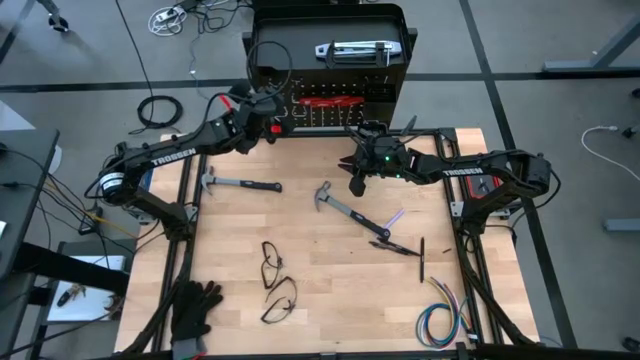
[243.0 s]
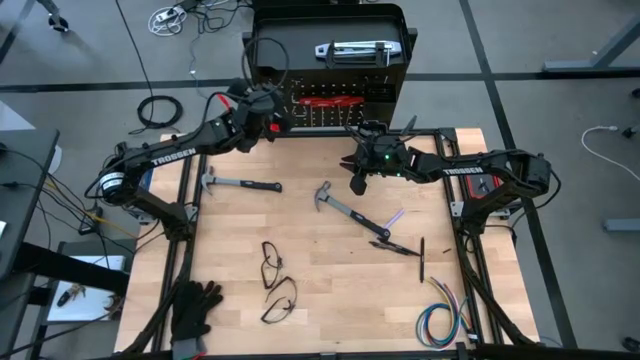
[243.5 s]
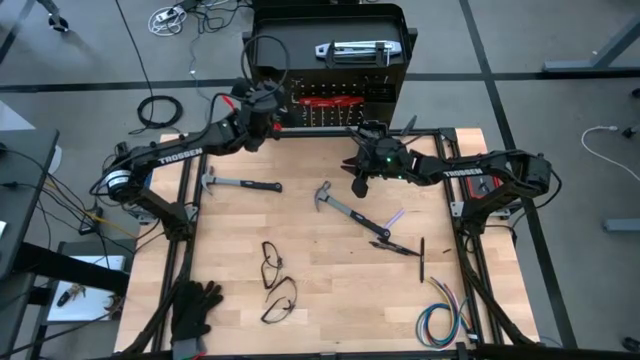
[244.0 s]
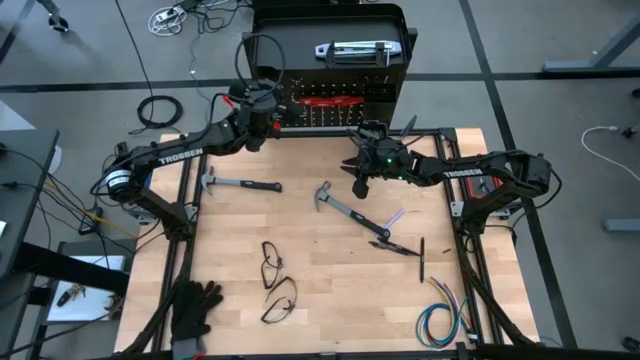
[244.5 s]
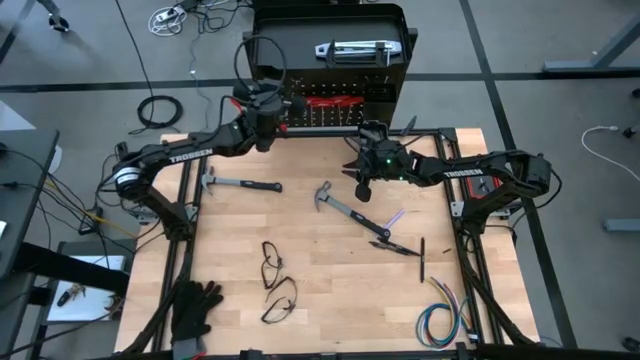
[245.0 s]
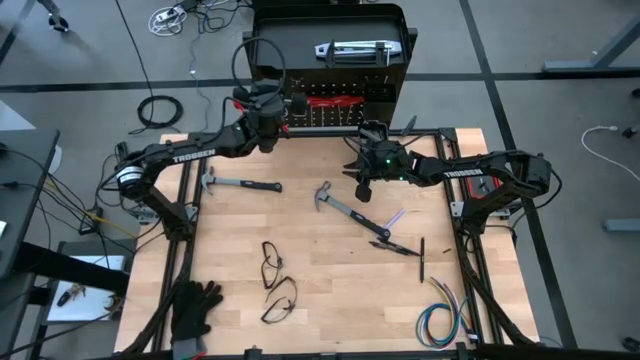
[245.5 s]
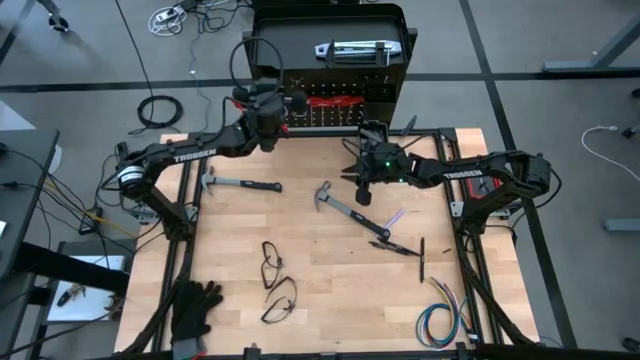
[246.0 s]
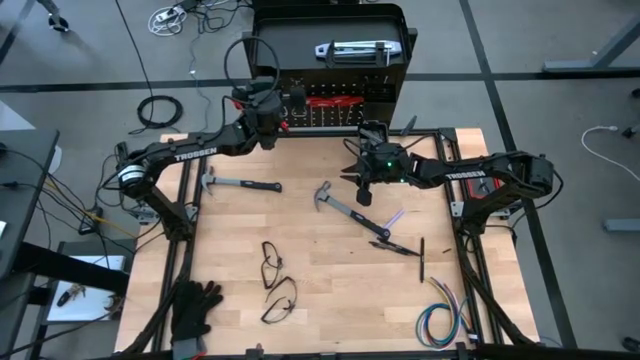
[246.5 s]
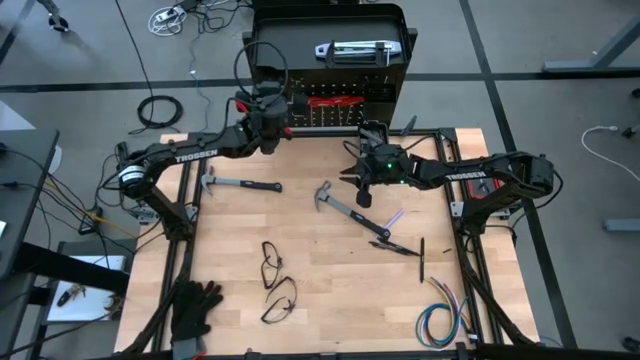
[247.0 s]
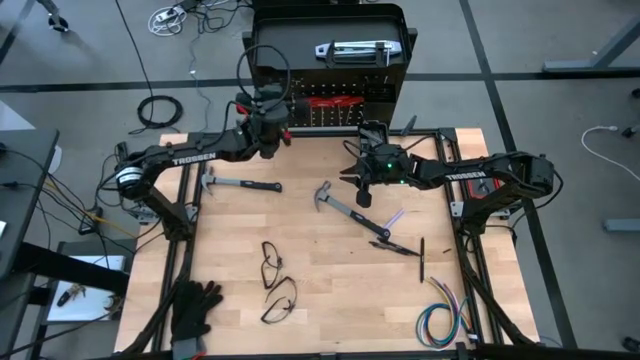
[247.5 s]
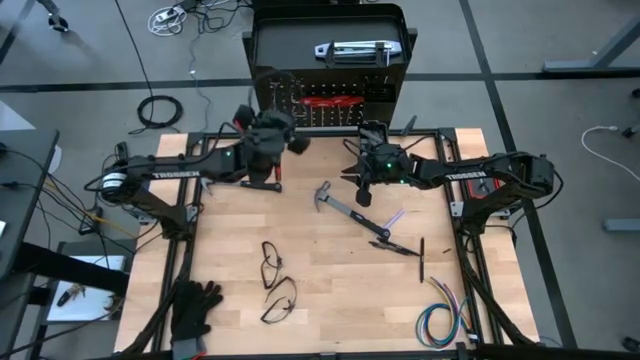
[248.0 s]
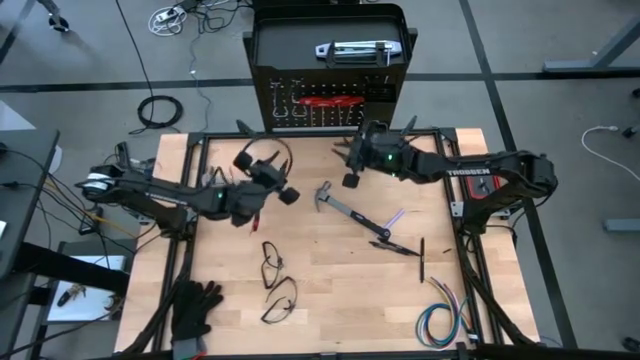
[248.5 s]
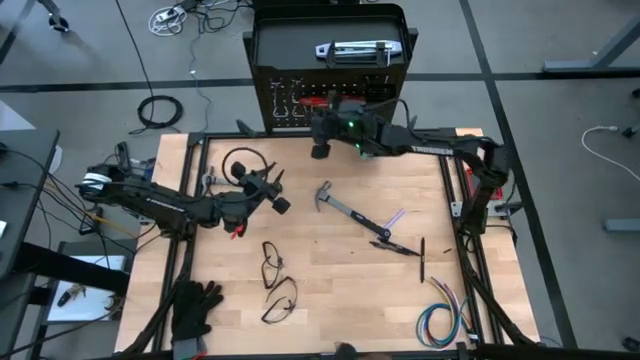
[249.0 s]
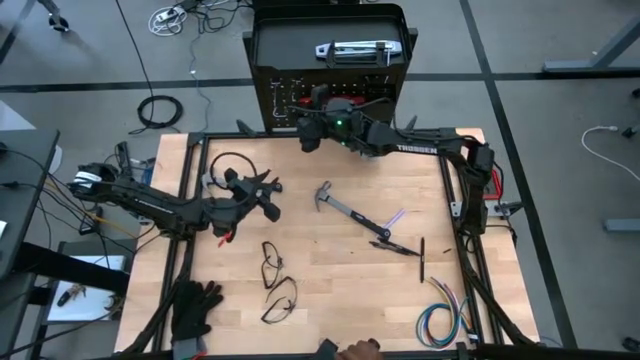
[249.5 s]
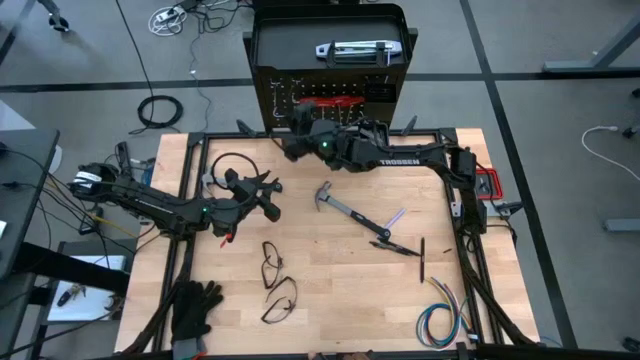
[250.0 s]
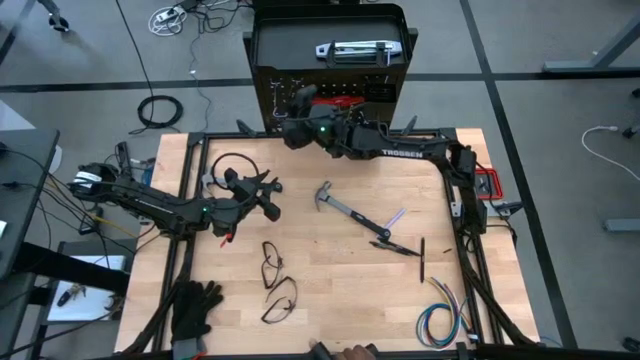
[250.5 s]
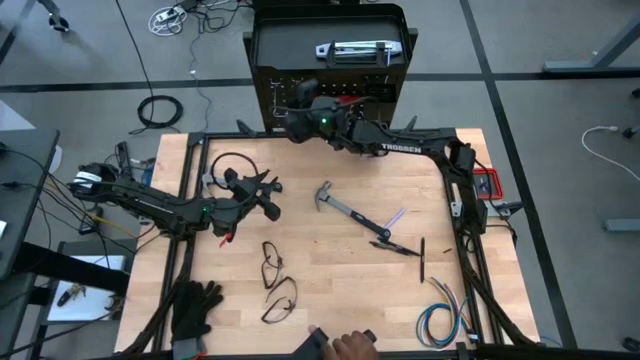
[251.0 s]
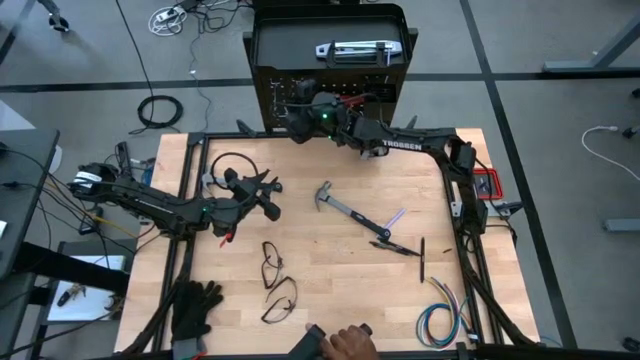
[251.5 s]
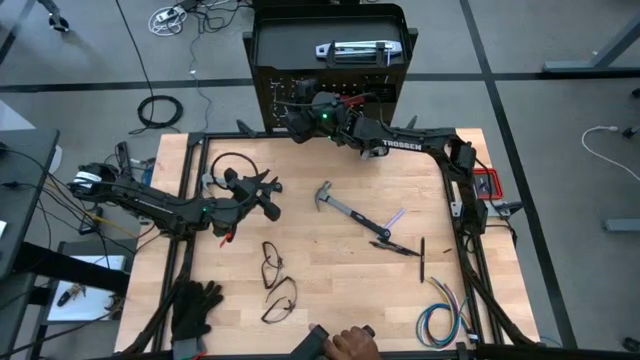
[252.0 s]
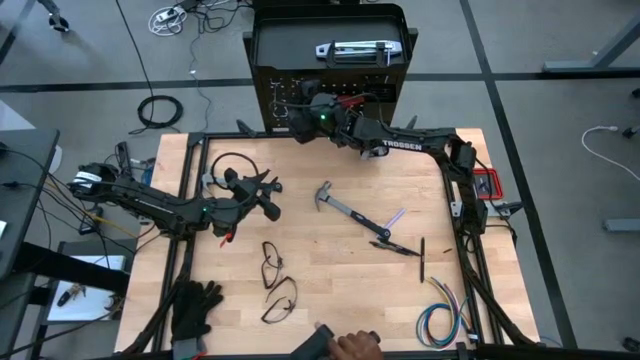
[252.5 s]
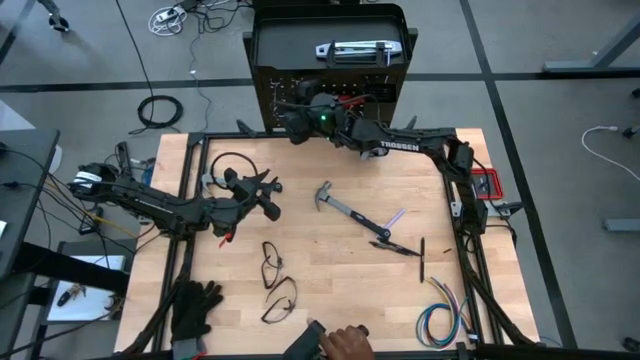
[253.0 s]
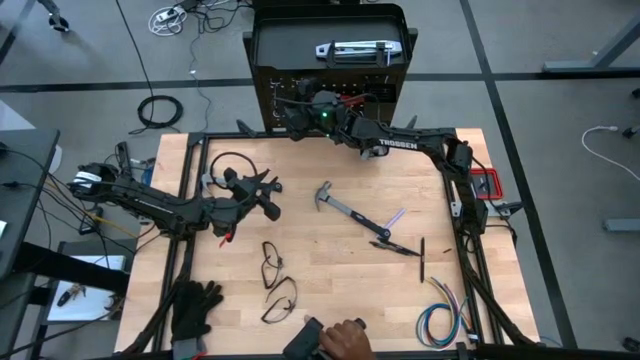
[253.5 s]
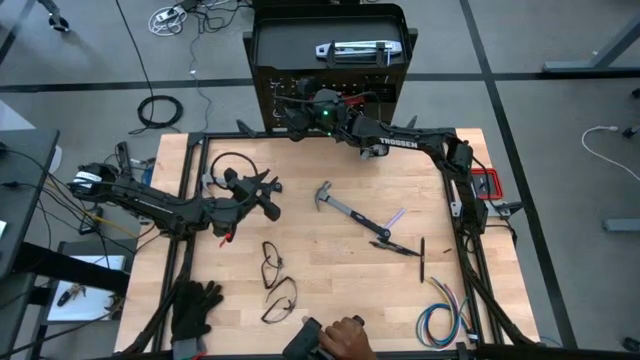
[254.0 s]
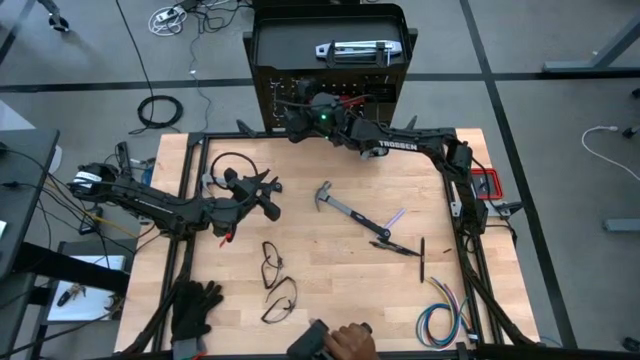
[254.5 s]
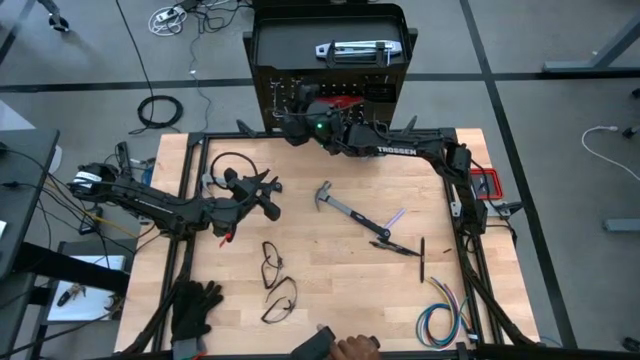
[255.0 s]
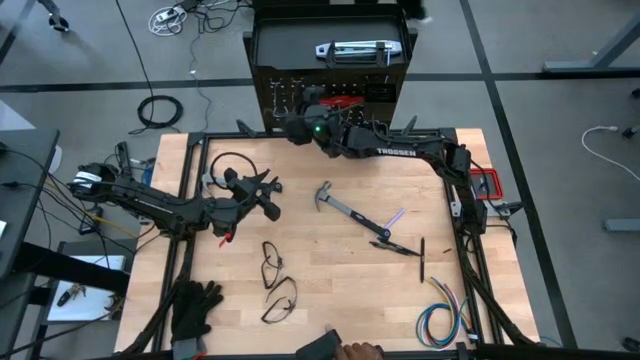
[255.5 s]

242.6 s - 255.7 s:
Task: Hang tools onto peg board
Adjust the top left hook

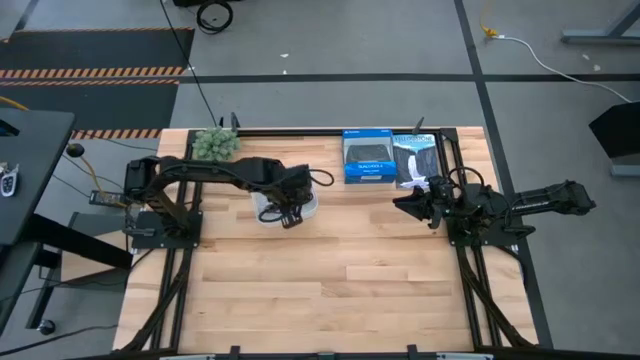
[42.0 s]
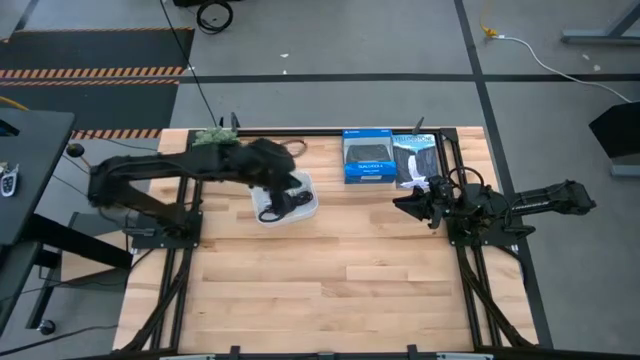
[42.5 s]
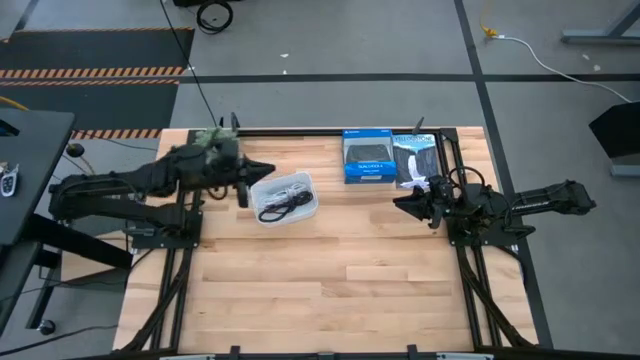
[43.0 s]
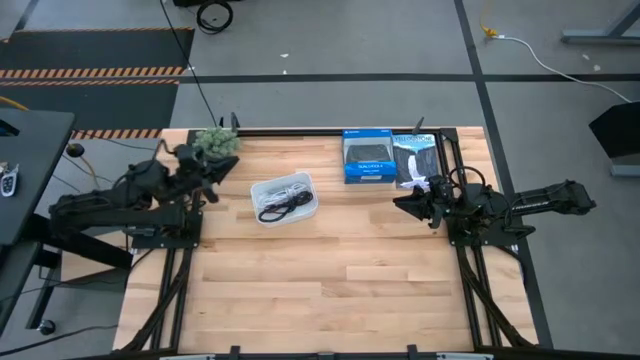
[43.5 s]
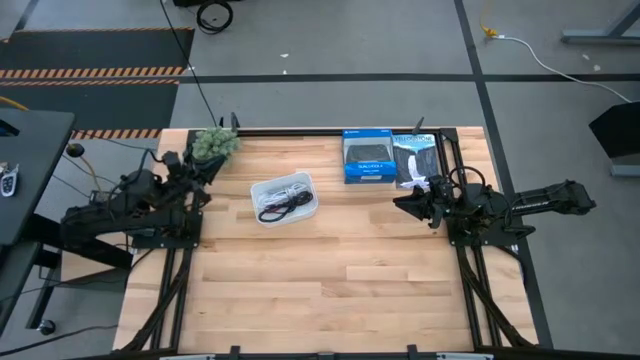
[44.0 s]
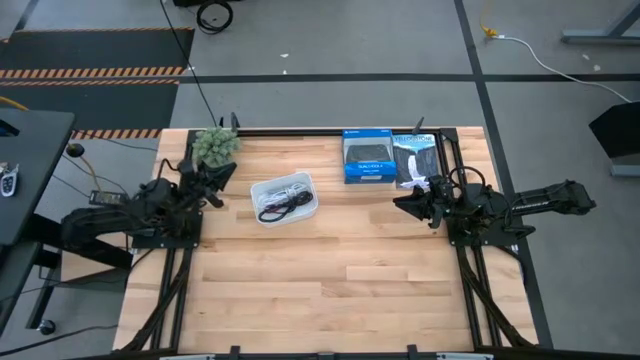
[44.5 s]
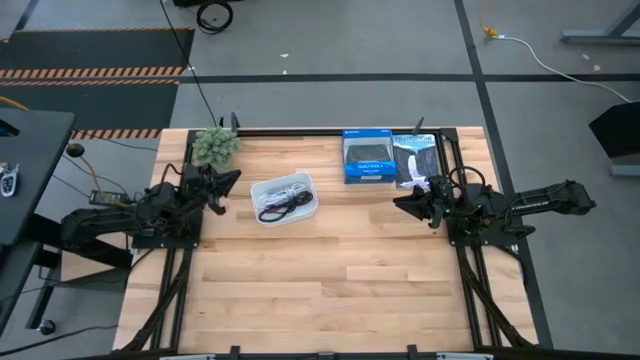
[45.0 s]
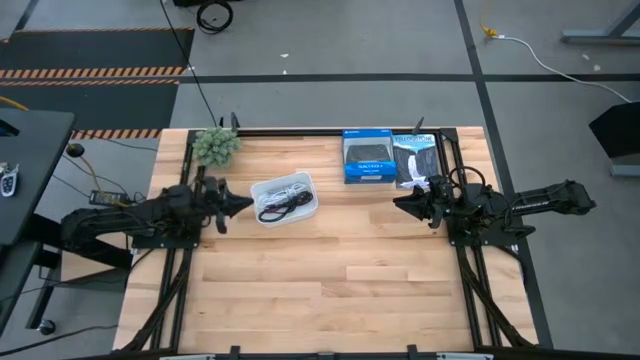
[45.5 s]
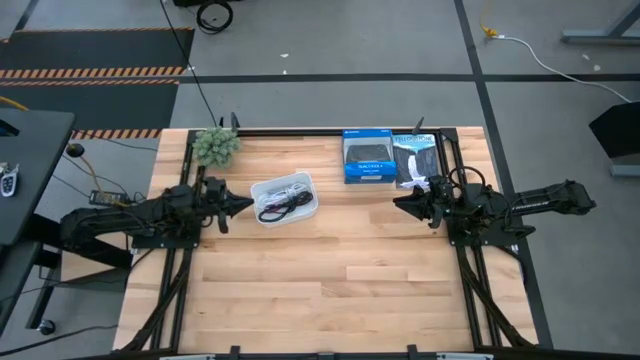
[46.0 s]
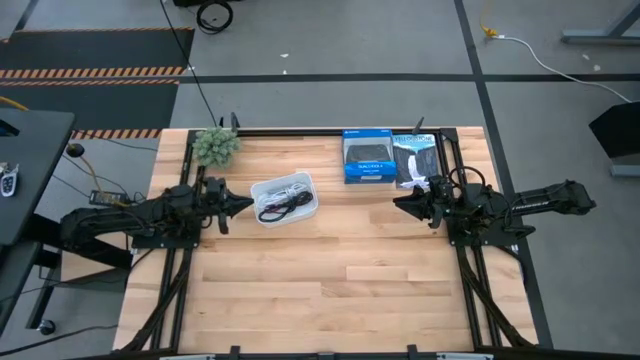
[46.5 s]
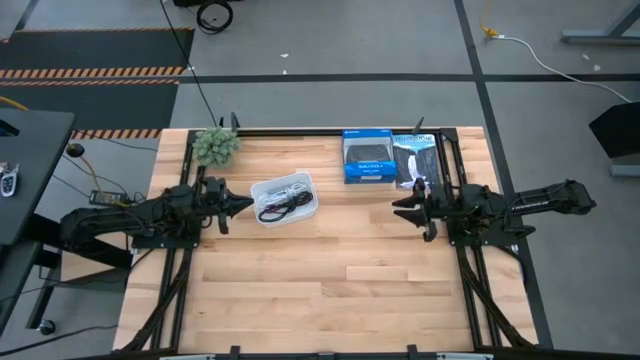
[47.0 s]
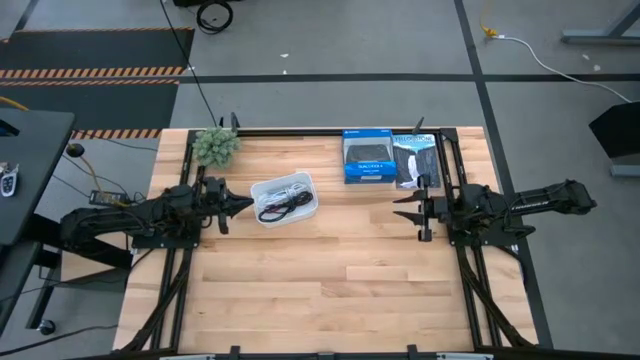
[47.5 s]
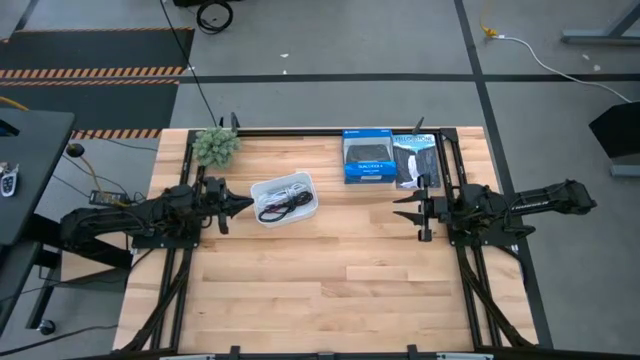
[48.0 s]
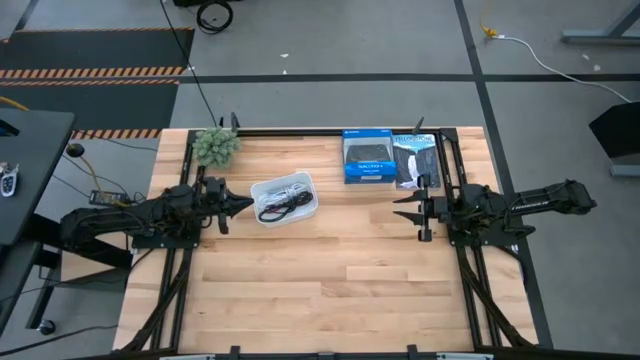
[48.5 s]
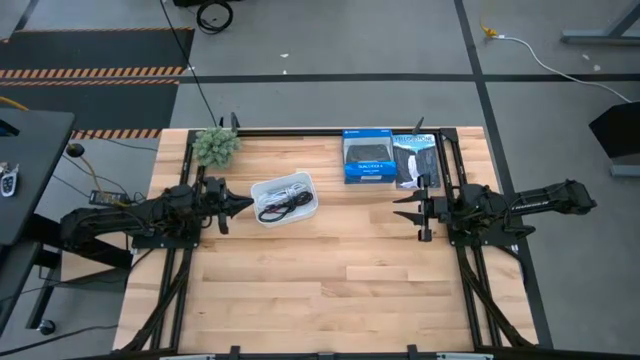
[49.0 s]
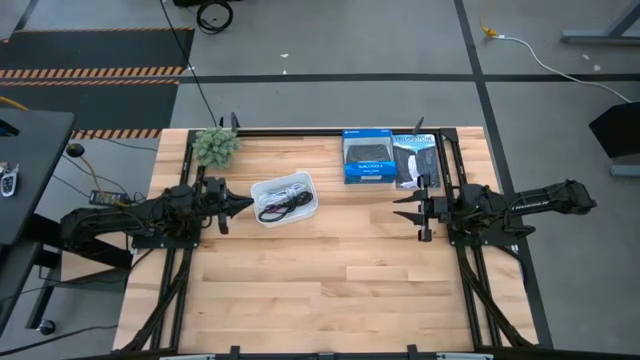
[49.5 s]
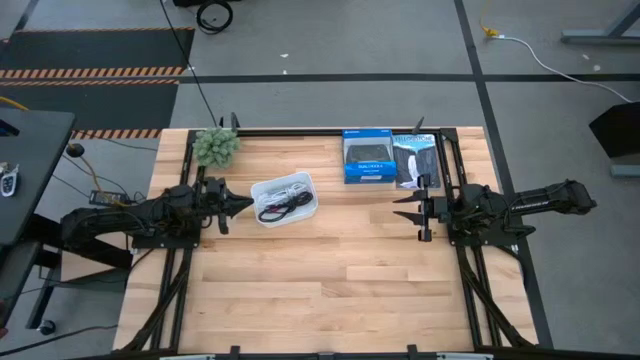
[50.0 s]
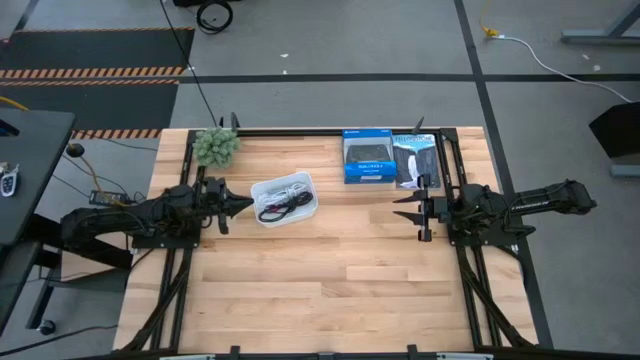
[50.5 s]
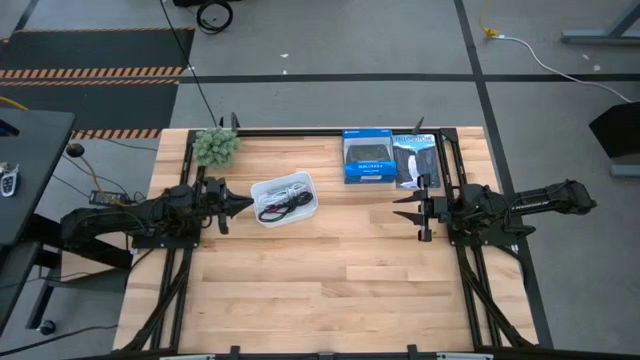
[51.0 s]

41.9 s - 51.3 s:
Task: Pick and place USB-C Cables
Return to Home Position
